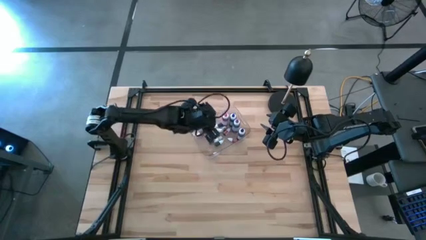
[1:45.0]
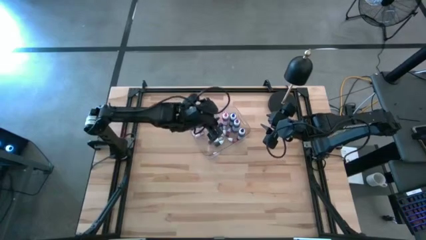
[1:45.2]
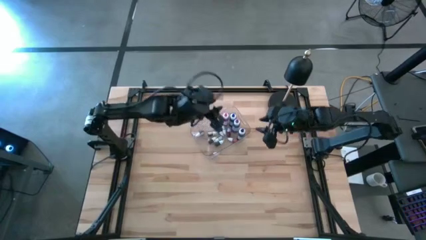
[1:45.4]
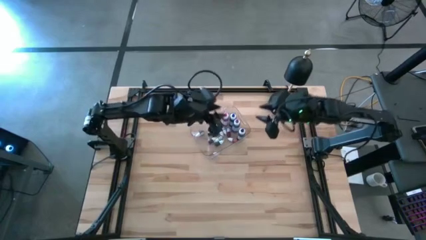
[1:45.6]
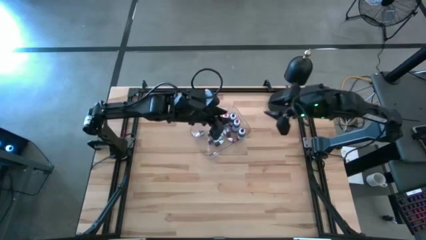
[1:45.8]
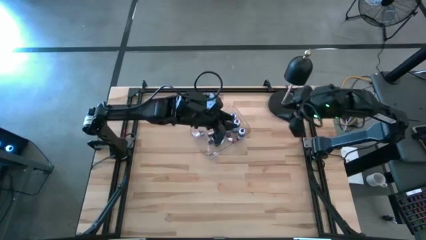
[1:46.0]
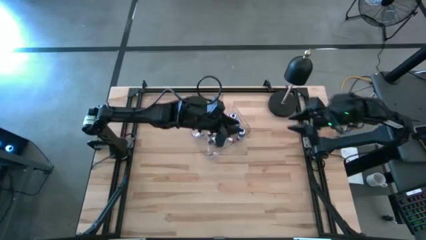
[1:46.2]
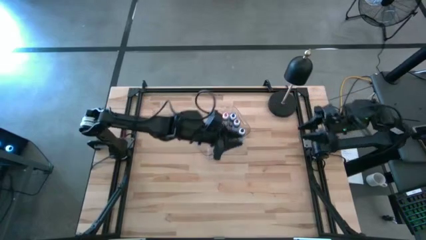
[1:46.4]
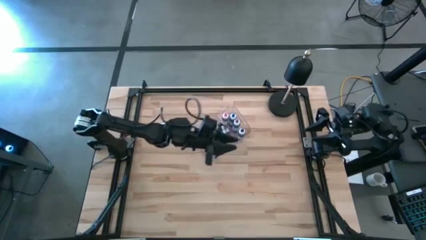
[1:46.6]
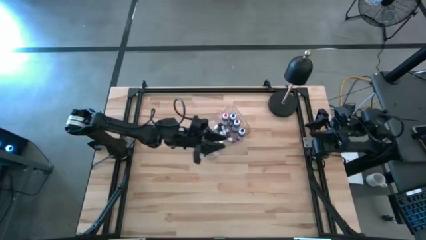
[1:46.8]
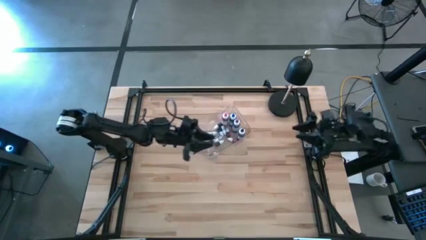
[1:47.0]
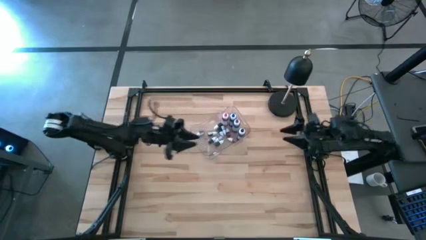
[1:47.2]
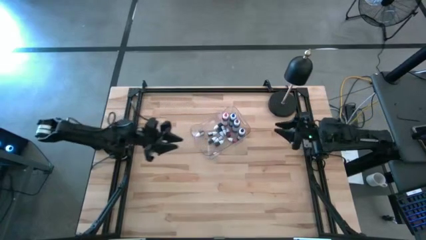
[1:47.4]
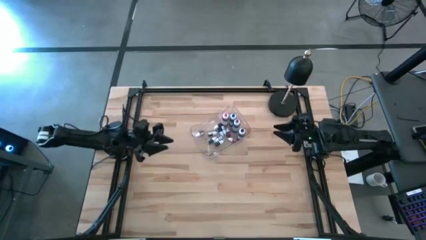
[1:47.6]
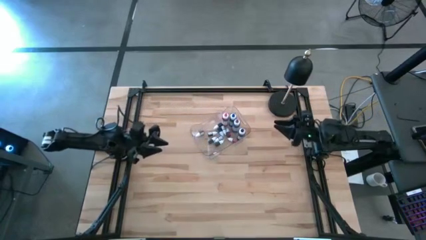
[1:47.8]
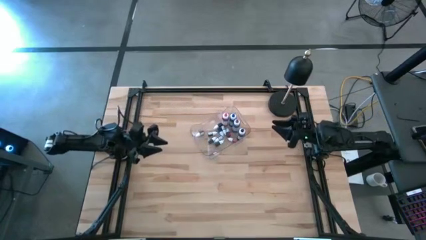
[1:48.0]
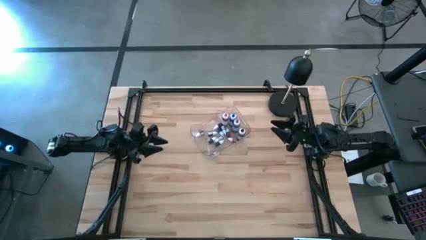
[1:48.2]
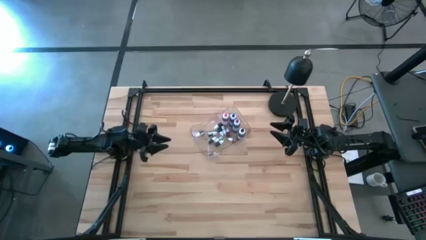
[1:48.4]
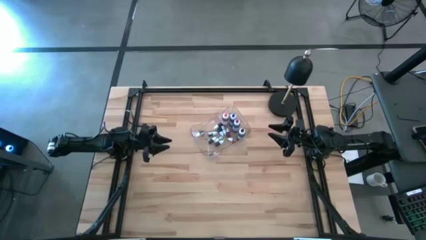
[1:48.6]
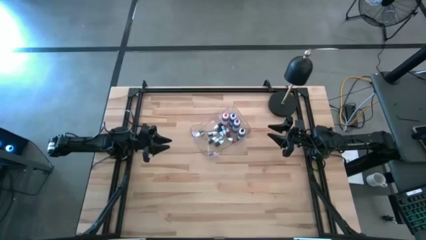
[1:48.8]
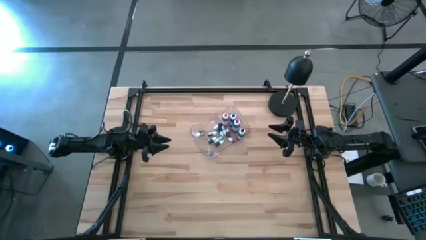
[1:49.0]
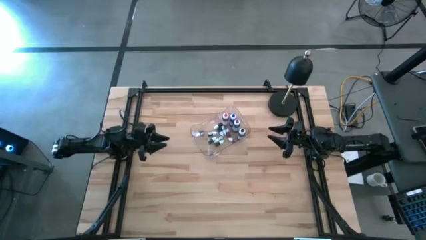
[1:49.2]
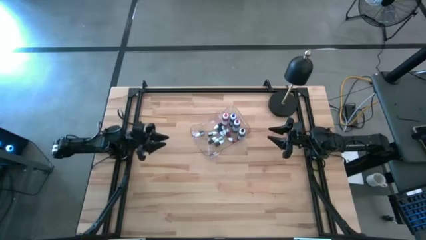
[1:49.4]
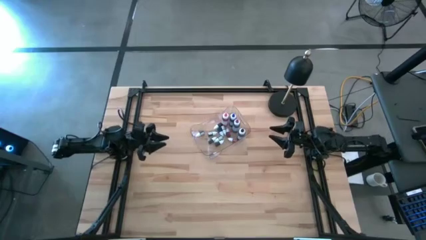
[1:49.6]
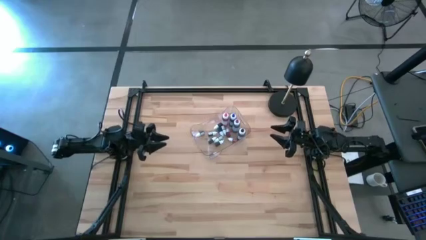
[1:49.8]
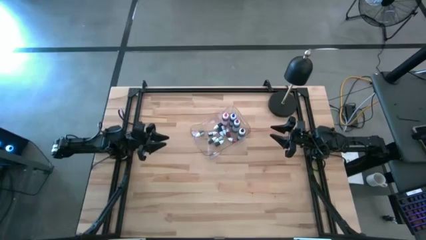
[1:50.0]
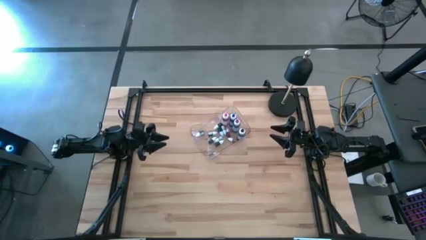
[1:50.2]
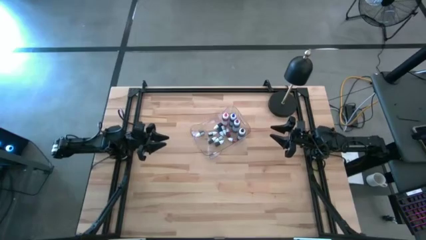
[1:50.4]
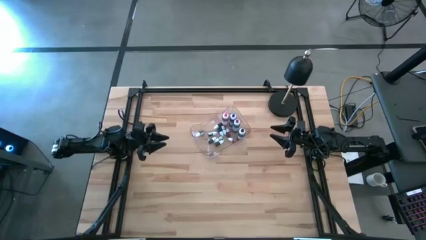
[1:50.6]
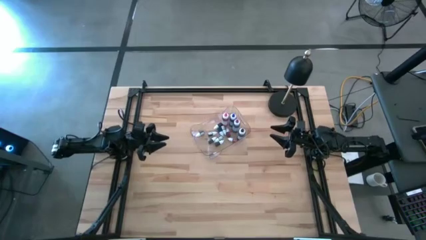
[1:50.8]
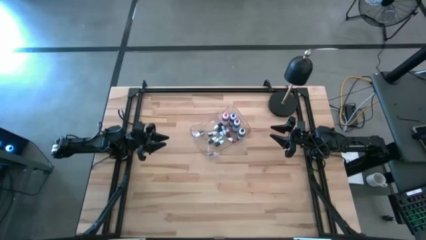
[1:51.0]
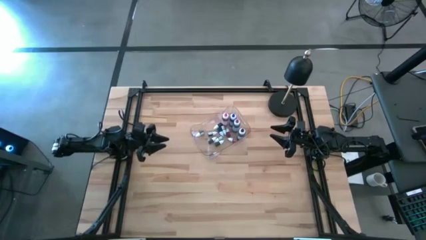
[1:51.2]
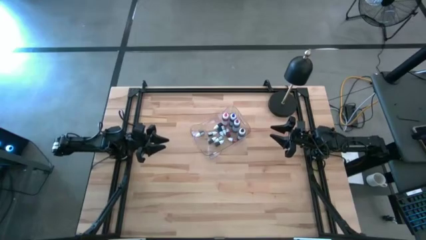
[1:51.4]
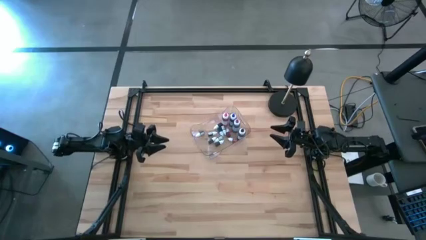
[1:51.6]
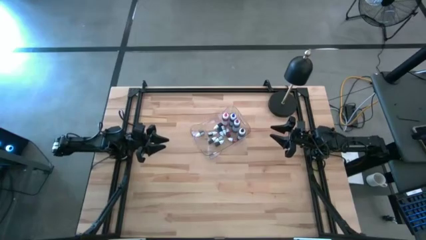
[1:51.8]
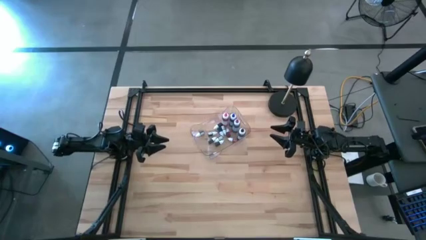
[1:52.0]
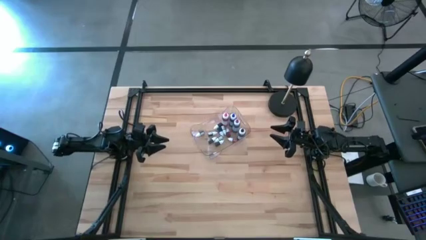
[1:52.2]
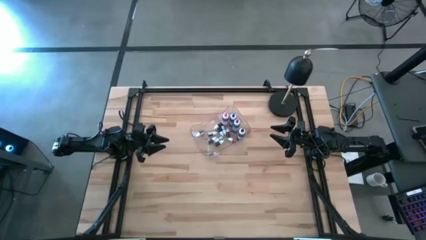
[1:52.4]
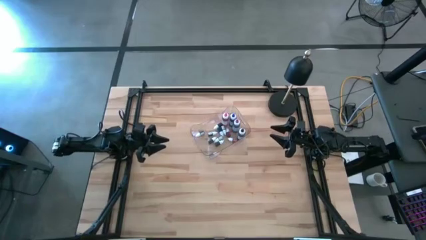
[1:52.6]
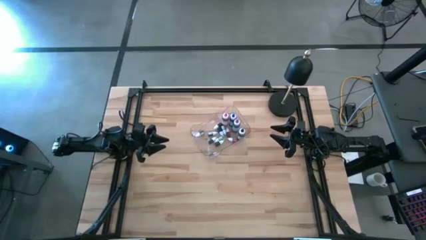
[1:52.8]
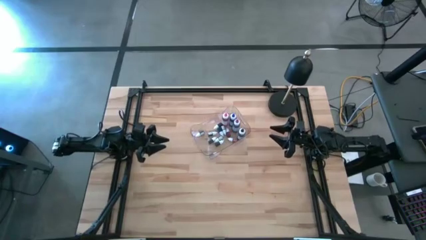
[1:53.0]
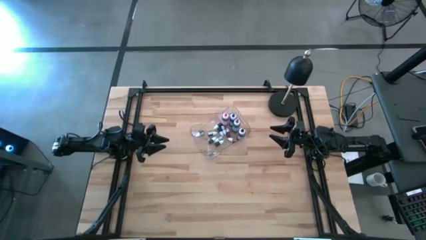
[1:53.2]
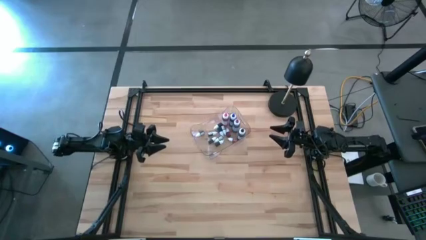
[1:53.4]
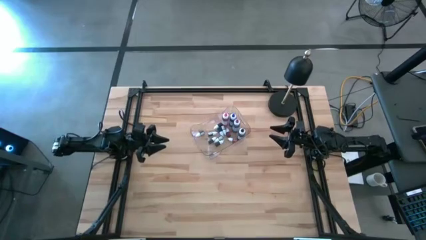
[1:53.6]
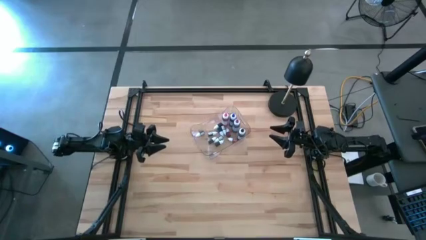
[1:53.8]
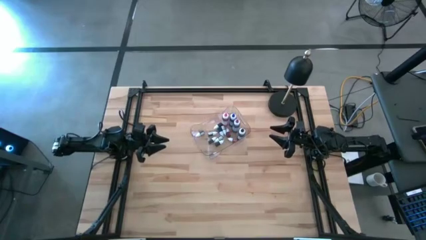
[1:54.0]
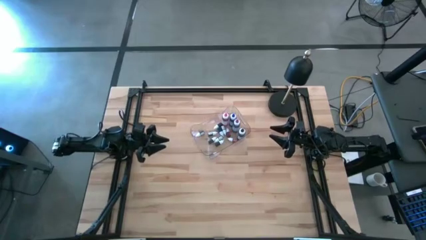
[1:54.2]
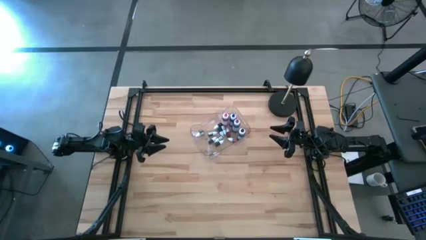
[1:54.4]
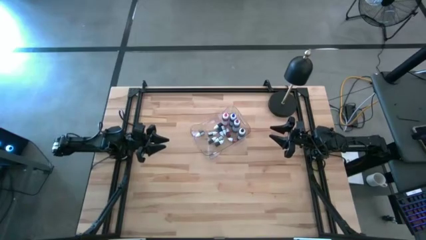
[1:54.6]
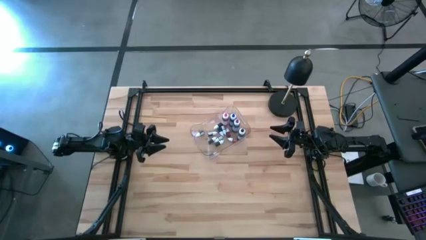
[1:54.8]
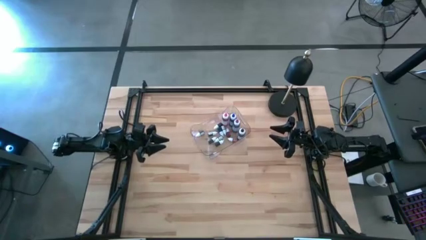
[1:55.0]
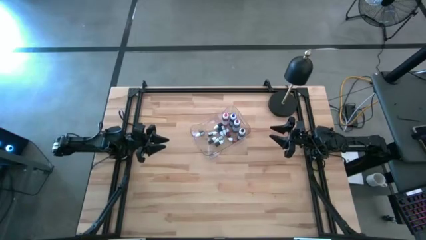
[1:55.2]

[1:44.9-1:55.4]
Task: Pick & Place food coloring
Return to Home Position
